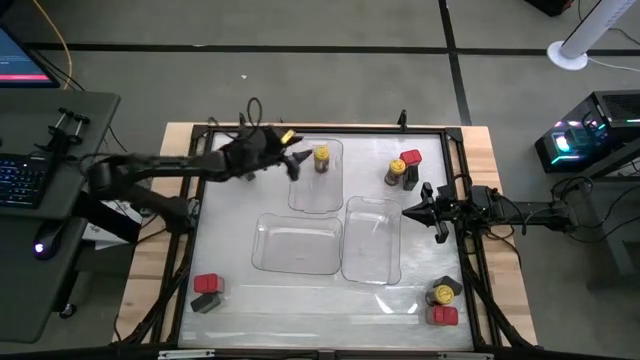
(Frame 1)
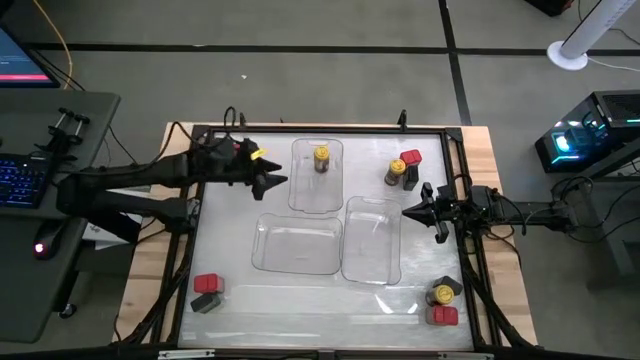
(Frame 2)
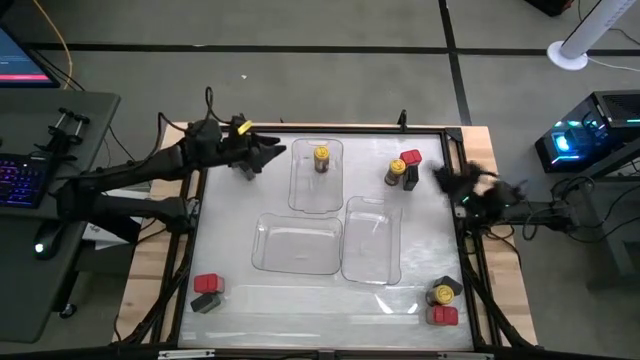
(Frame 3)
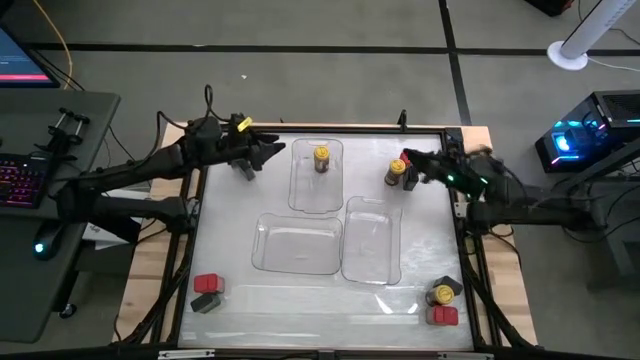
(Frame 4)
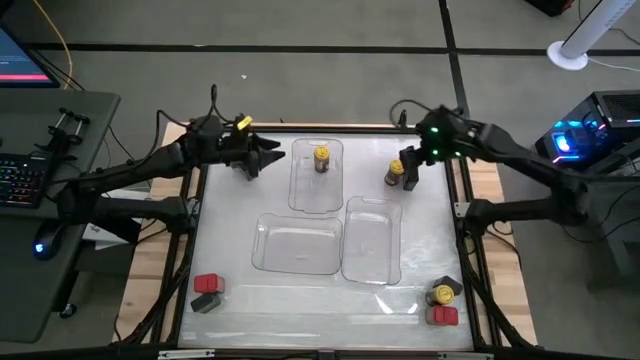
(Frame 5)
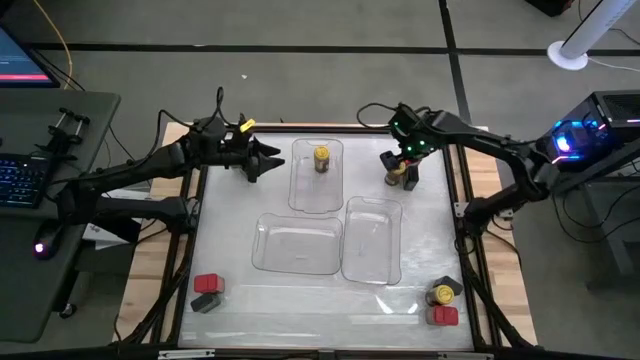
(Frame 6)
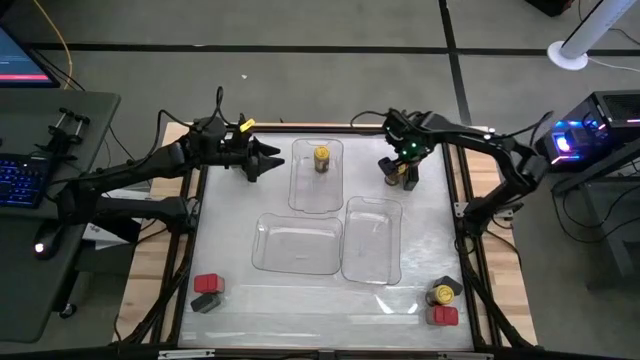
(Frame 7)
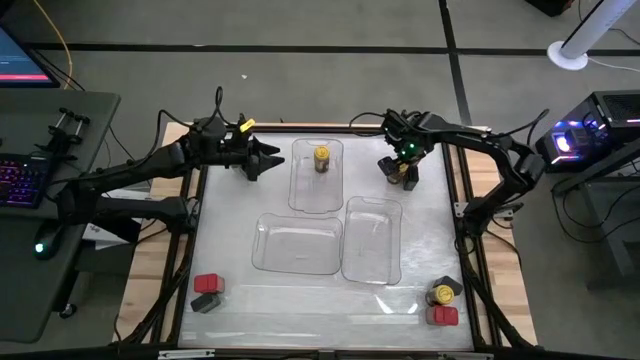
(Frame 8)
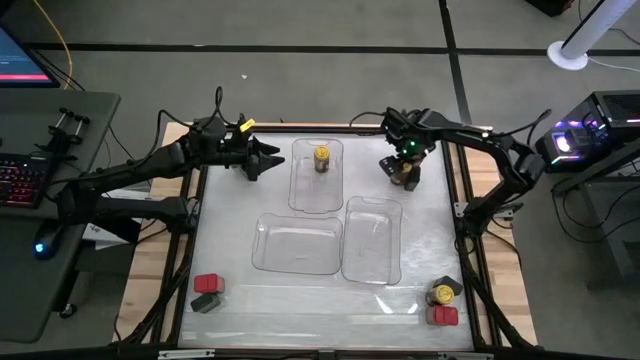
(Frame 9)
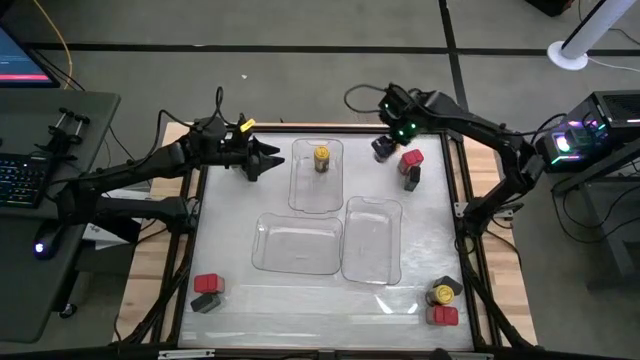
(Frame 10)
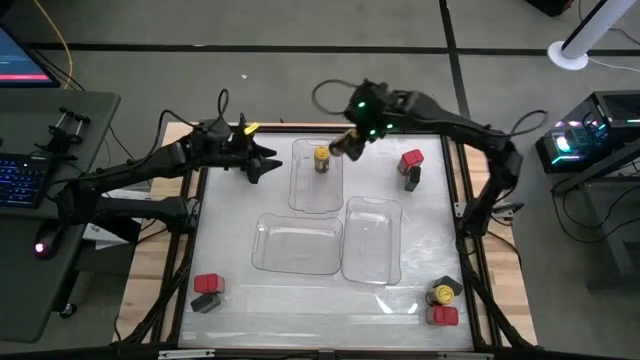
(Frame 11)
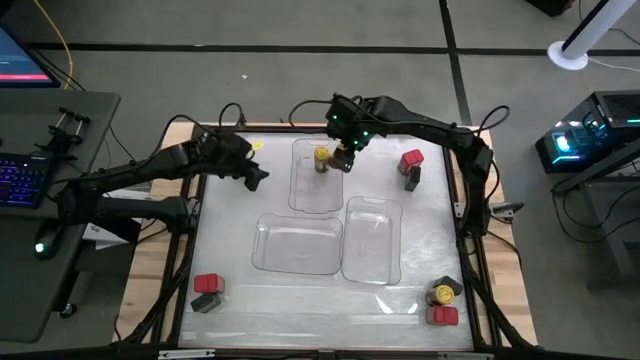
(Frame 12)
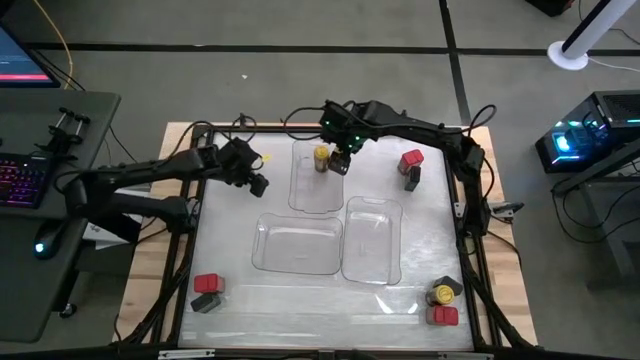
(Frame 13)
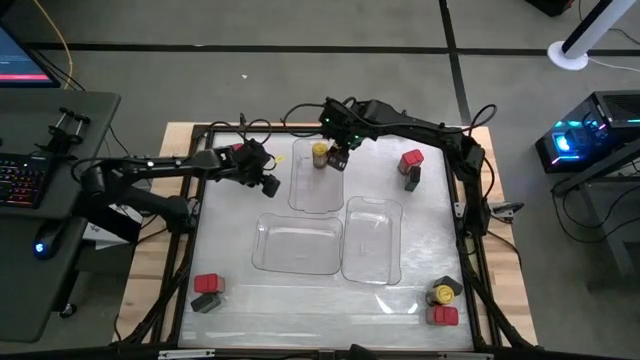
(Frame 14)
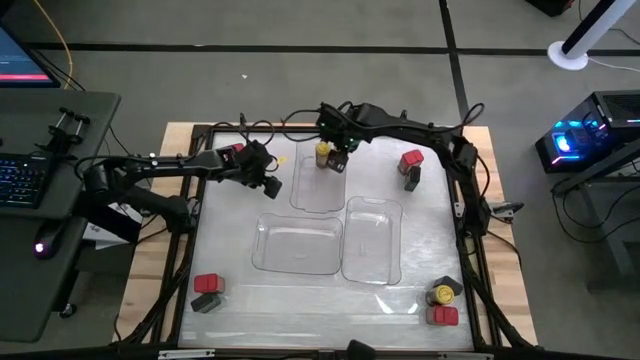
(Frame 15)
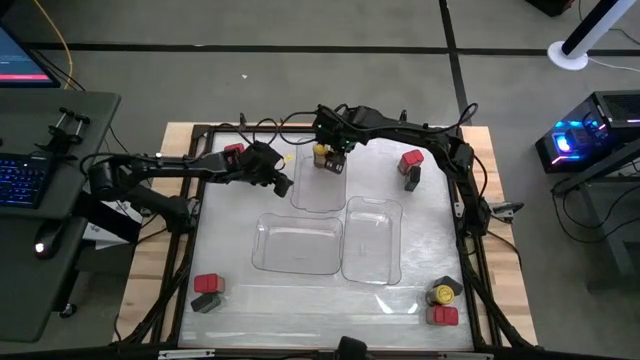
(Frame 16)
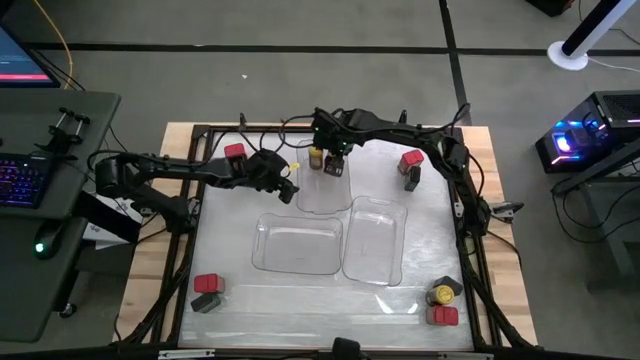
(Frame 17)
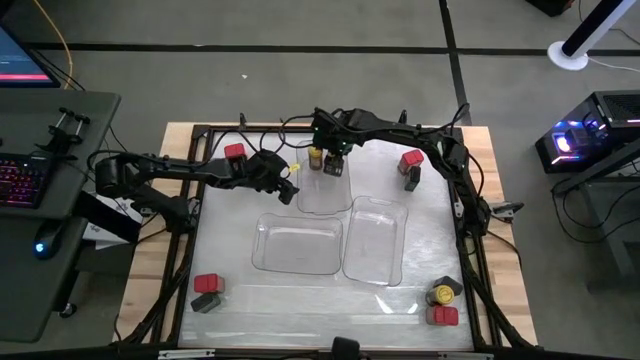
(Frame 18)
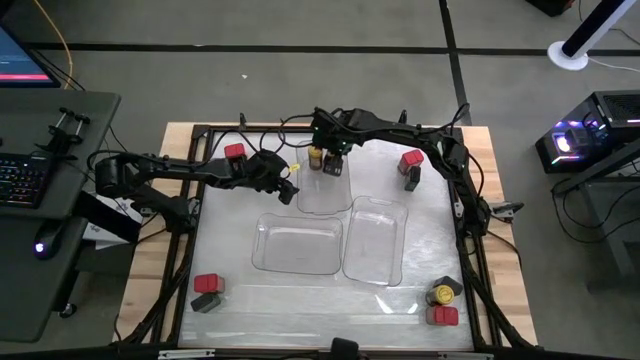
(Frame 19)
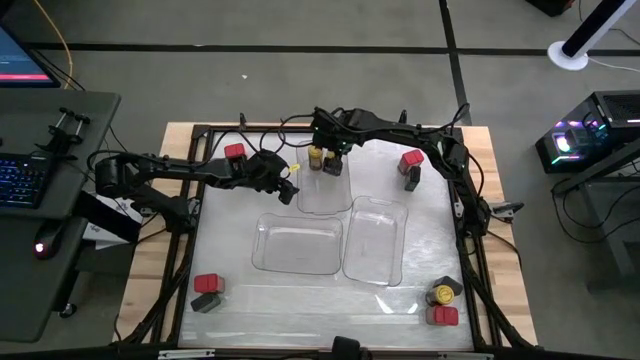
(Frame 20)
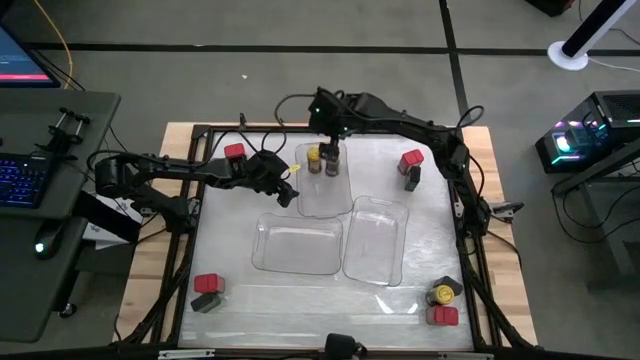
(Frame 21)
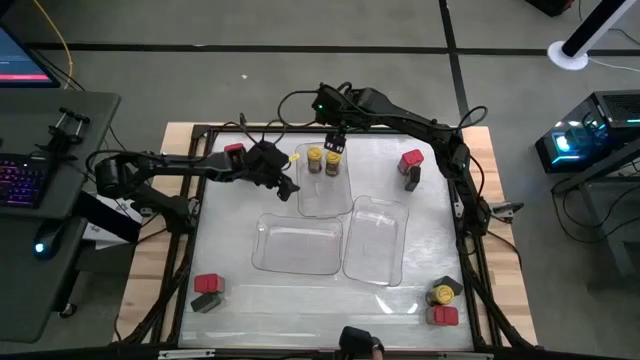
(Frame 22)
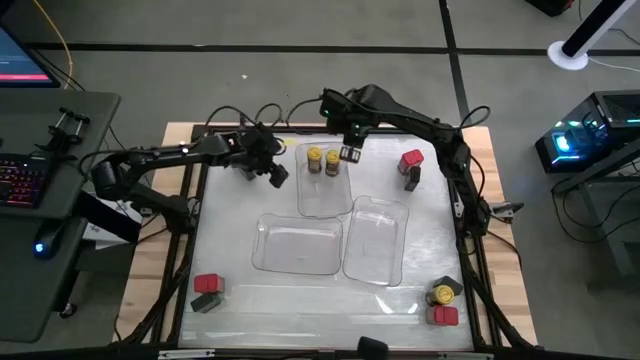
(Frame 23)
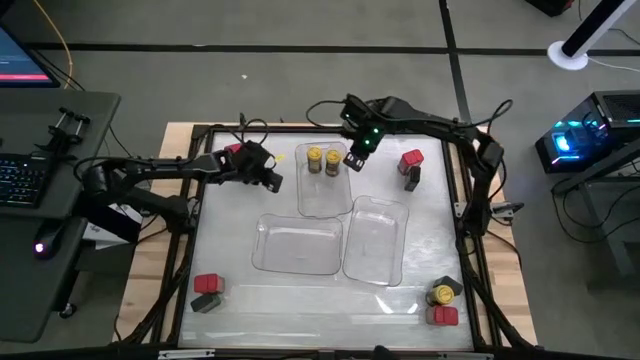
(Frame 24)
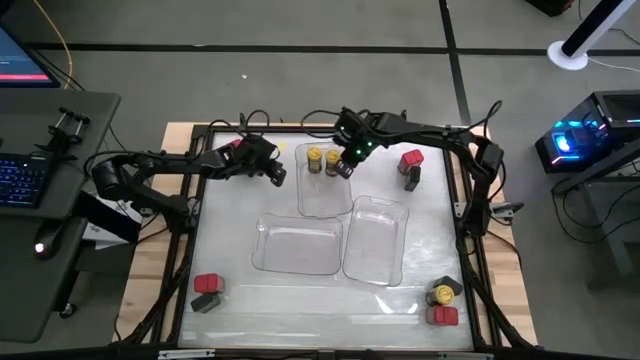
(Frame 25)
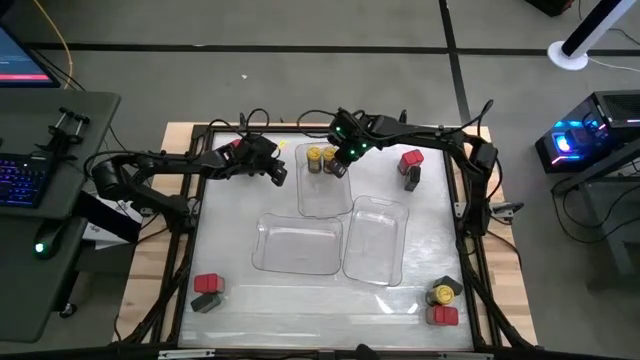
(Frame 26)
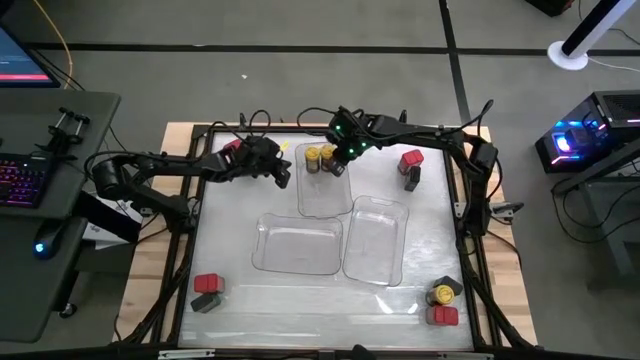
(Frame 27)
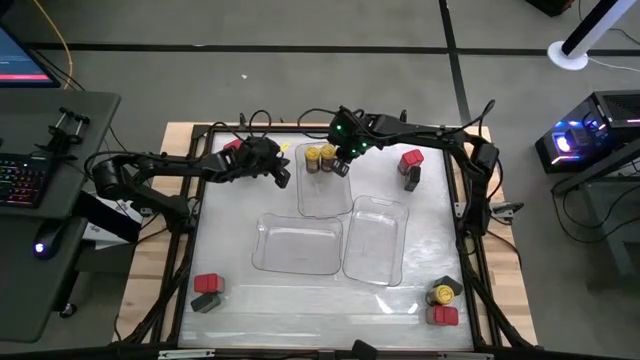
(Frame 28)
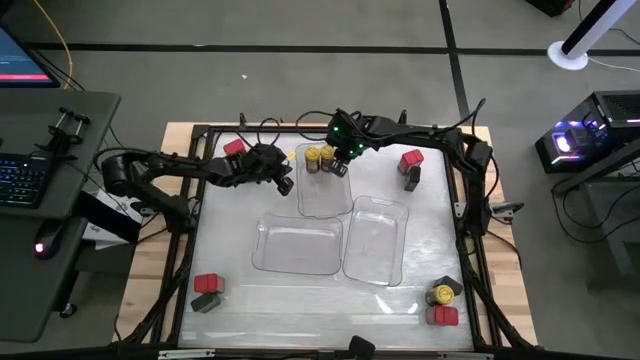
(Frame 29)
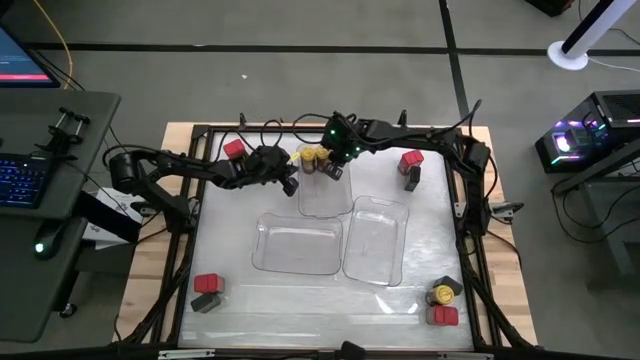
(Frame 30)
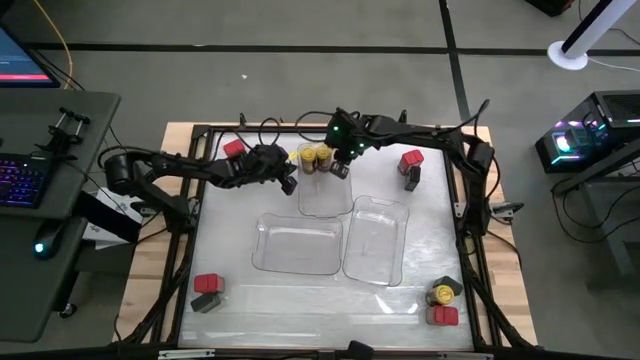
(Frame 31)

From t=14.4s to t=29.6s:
Task: Sort spices by type
Put the top right yellow seasoning bottle into the top transparent bin

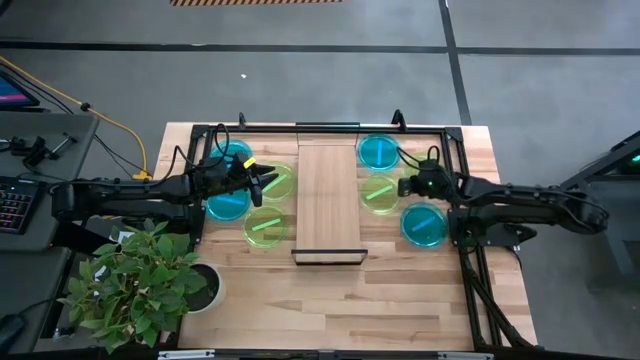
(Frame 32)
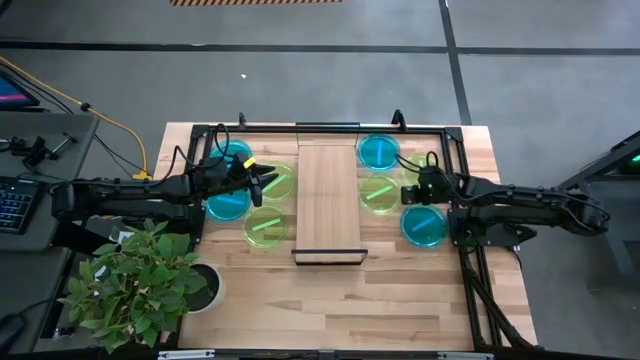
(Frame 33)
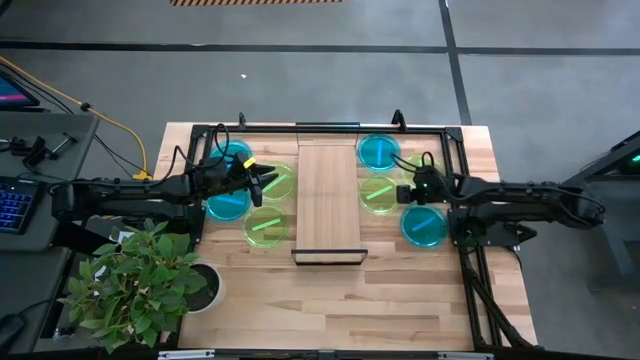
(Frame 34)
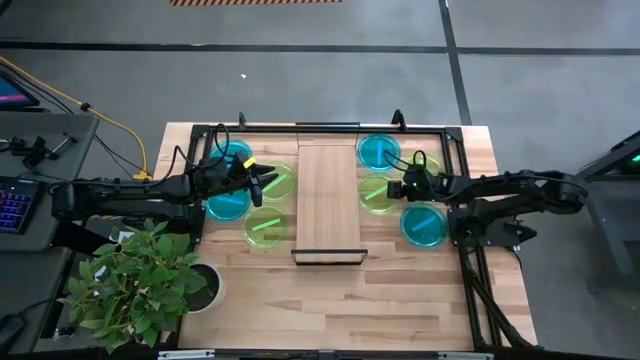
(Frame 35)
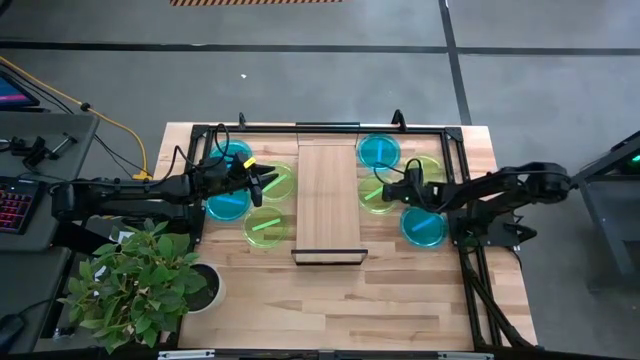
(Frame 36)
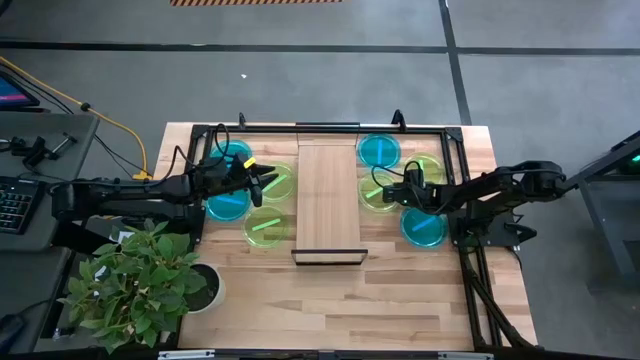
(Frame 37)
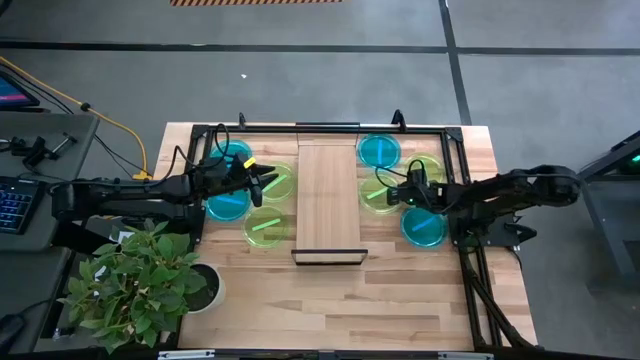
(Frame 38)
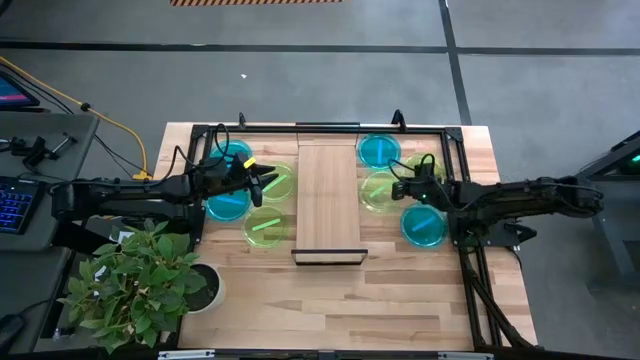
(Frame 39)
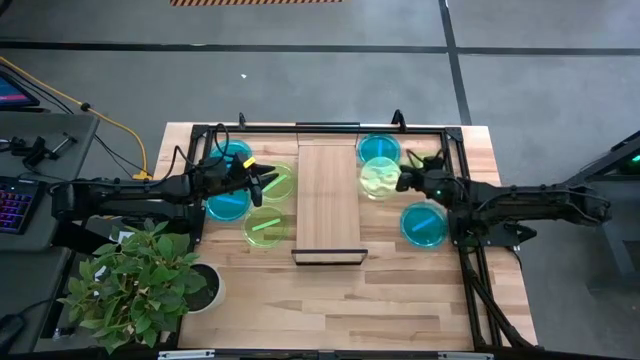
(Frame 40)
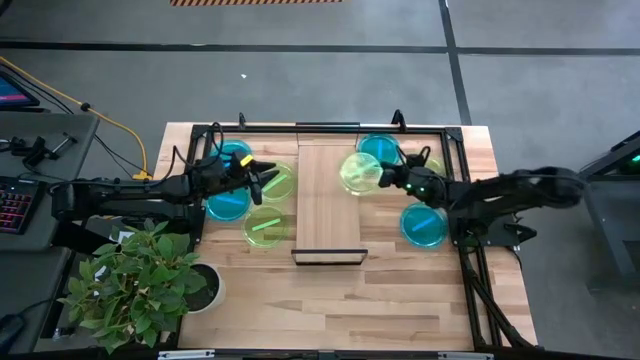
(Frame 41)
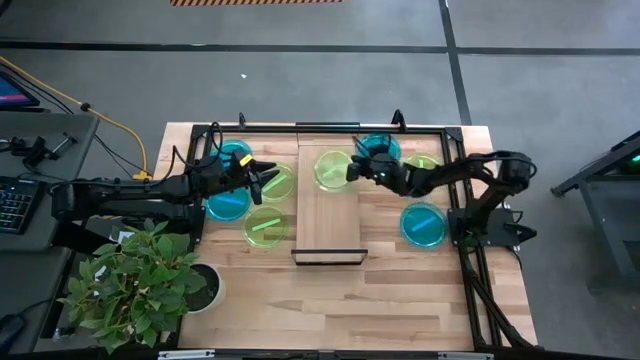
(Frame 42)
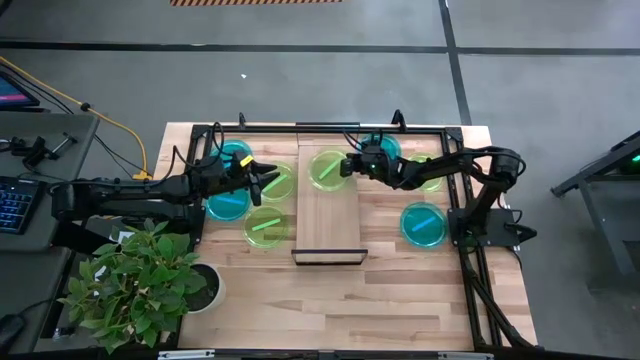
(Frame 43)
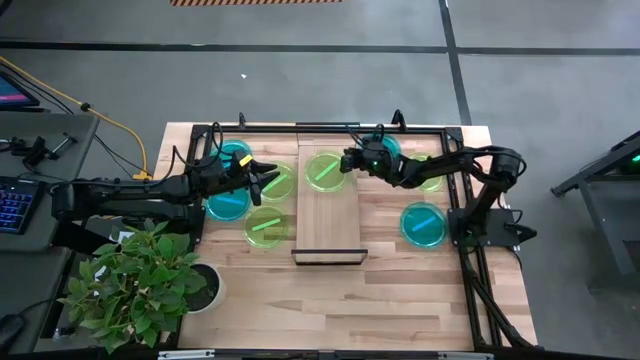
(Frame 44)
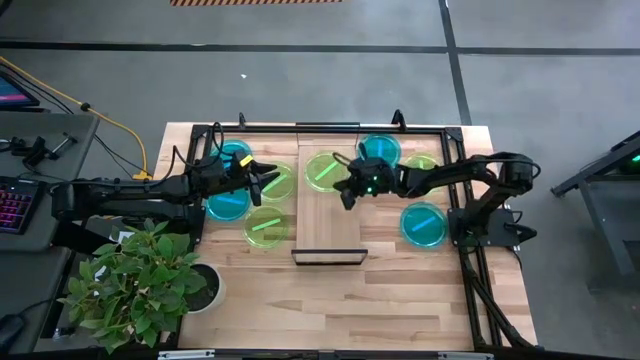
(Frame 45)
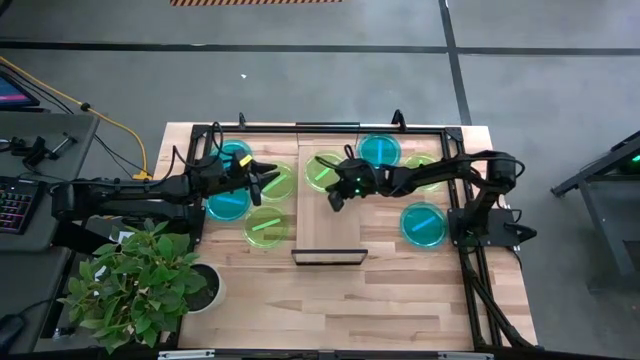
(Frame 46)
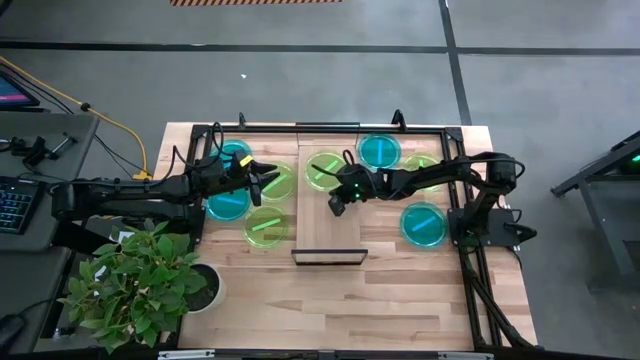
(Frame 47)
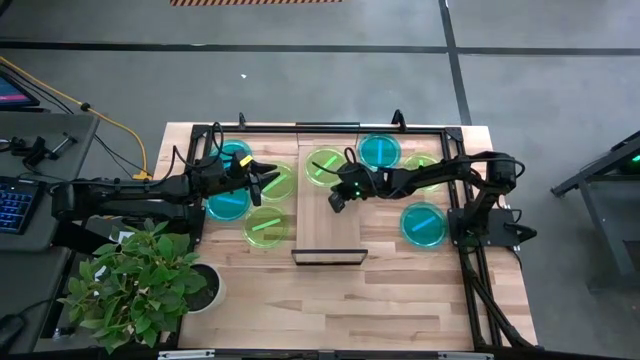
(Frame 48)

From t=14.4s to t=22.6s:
Task: Place and stack plates onto a shelf
Put the middle green plate on the shelf
